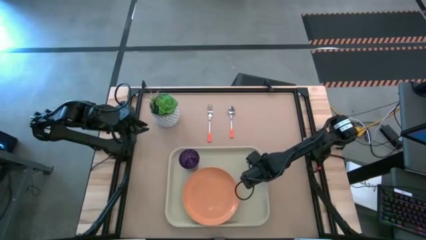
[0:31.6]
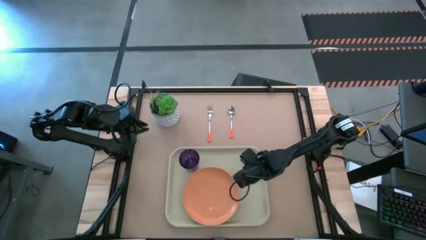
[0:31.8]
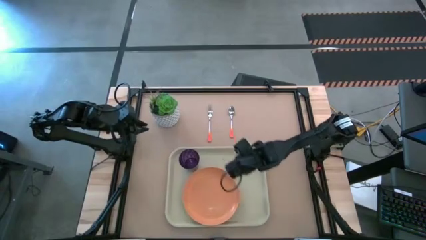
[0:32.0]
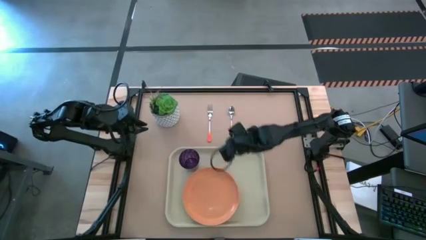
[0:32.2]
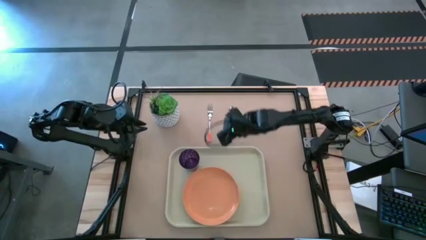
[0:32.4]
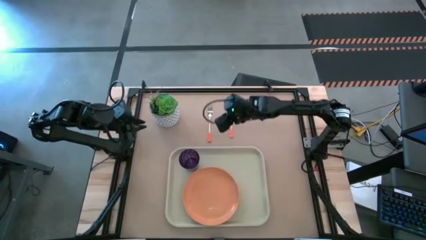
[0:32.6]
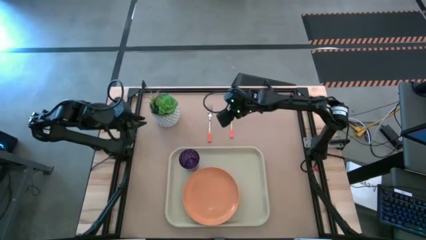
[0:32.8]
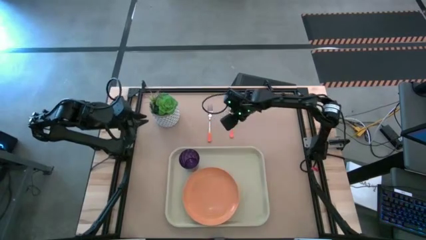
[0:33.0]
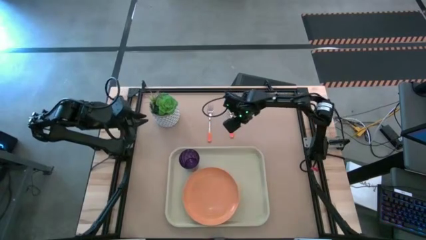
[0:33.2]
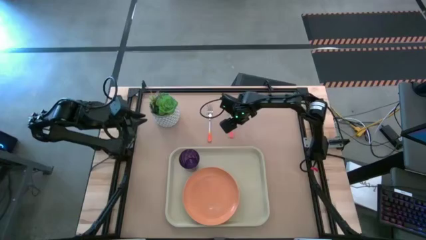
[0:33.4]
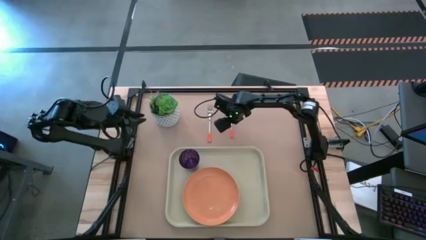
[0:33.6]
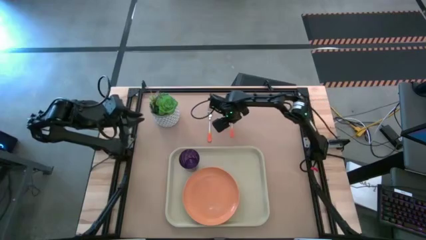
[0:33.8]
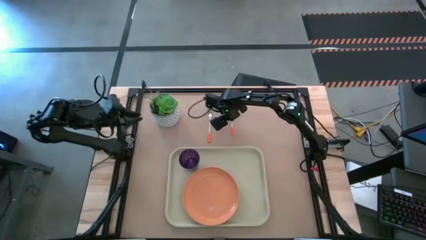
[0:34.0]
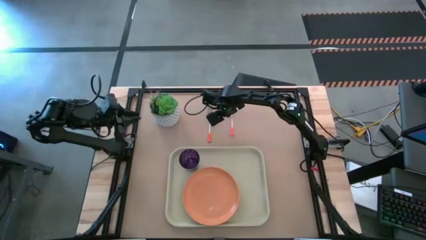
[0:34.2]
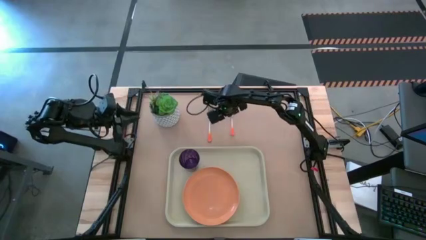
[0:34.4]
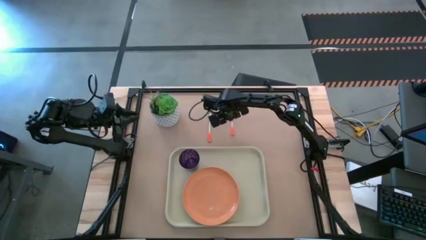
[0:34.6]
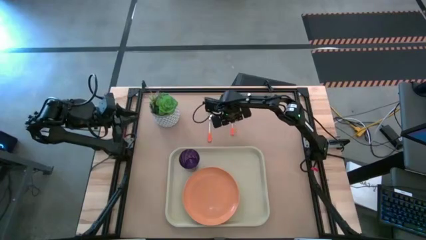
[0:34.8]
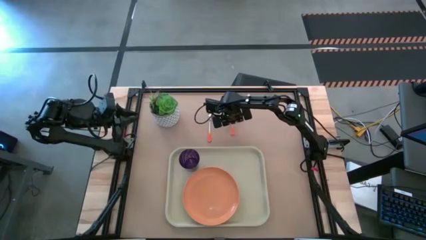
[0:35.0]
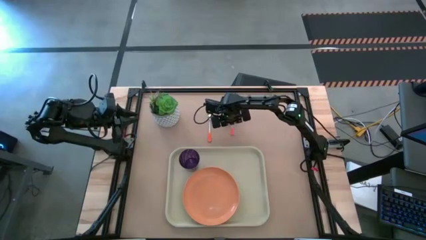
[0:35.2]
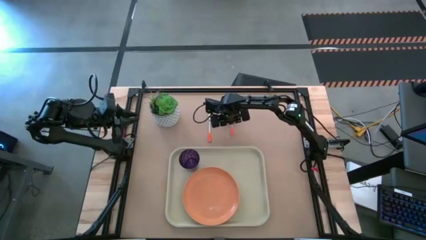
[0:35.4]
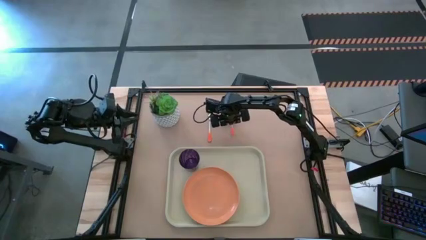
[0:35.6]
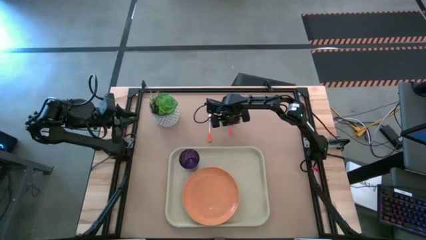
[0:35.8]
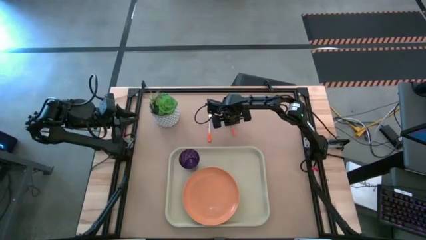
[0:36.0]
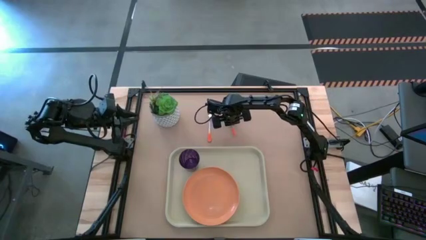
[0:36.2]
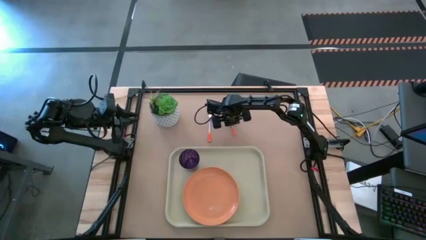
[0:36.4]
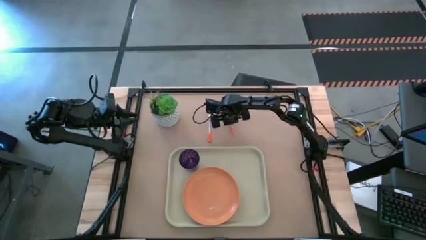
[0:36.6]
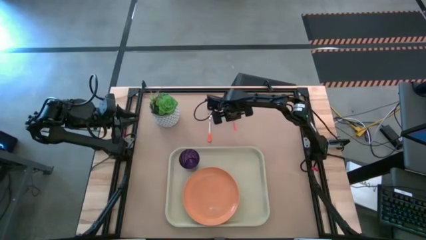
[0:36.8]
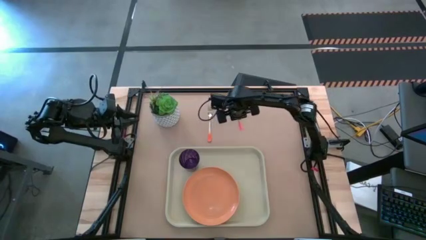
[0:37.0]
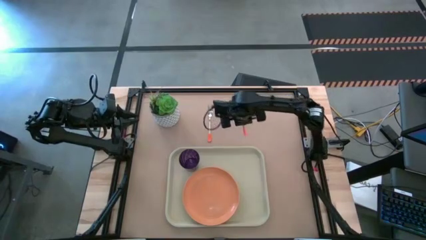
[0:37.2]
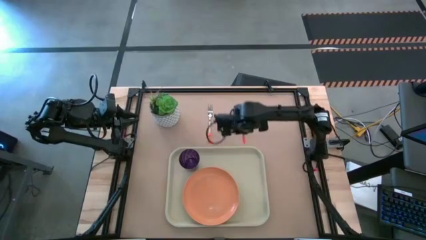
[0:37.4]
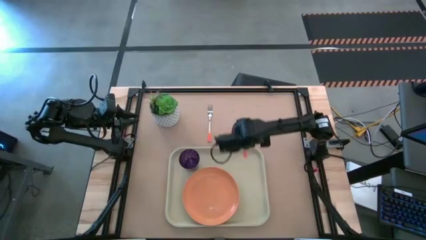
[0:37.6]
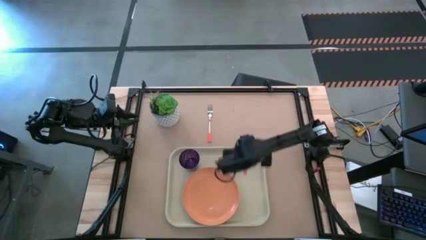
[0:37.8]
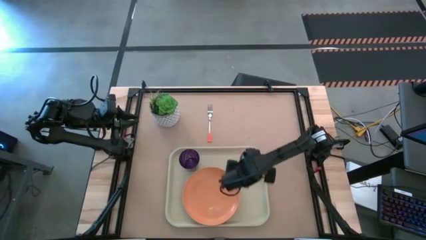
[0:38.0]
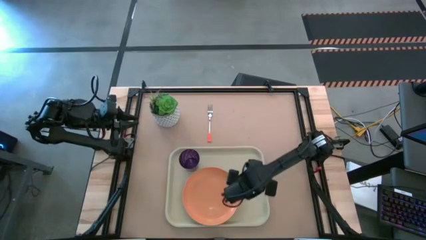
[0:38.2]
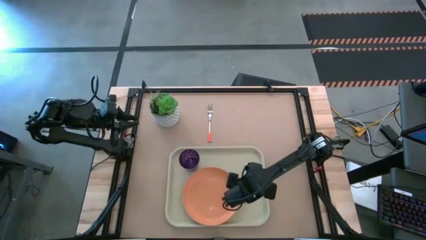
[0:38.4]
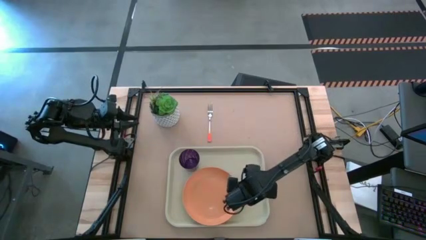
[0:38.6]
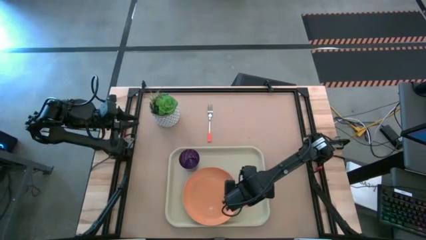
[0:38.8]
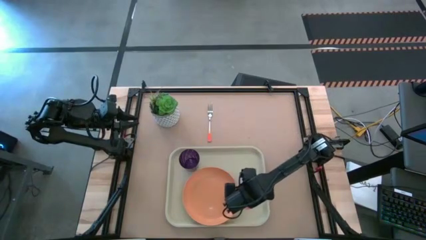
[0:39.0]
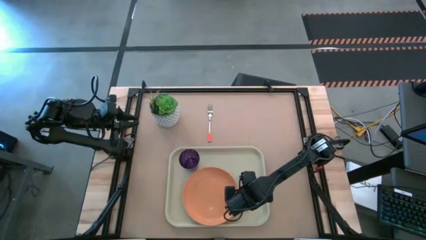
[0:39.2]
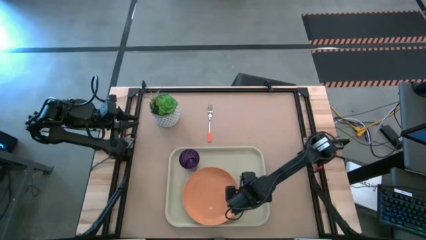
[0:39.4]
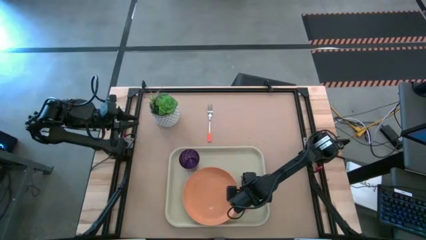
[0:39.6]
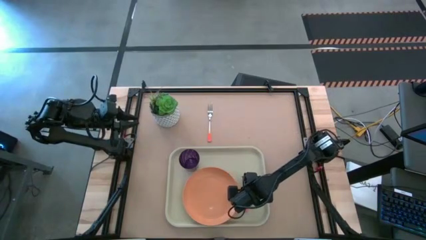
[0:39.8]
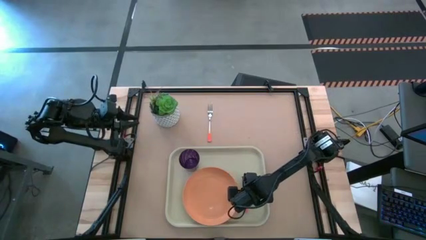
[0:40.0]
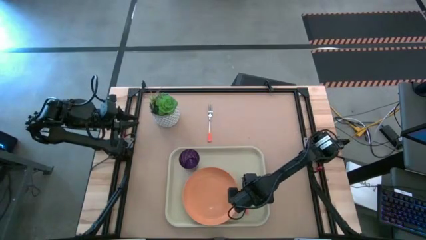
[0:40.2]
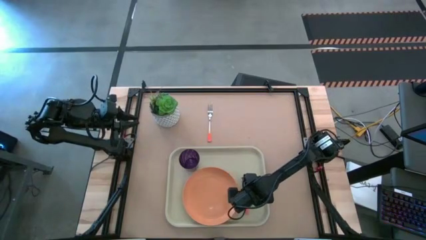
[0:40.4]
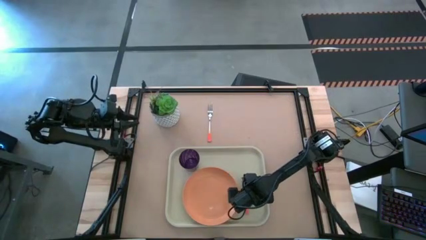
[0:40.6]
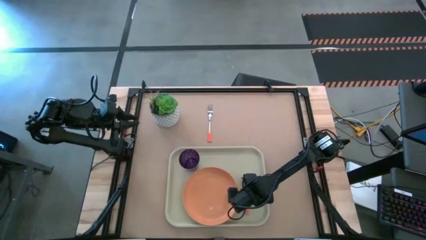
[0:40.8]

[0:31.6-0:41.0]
Task: Pick and place plate/cup/fork/spoon on tray
Put the orange spoon on the gray serving tray

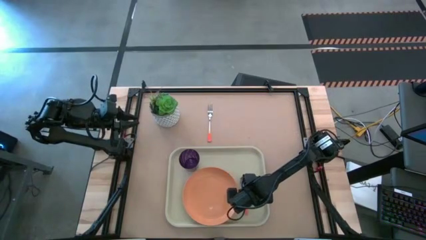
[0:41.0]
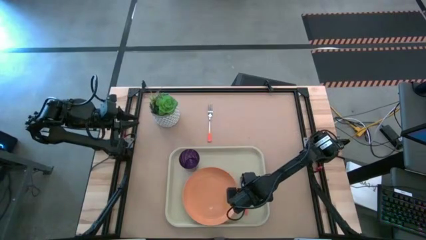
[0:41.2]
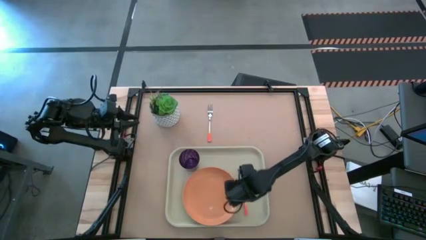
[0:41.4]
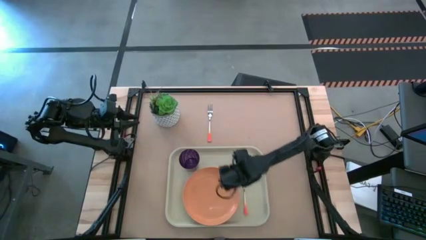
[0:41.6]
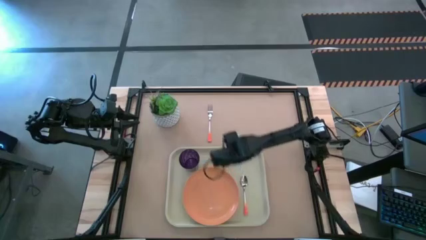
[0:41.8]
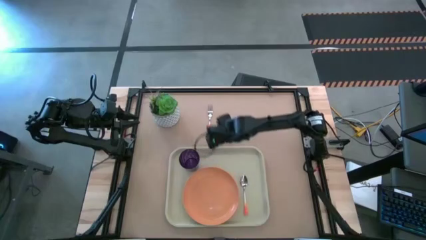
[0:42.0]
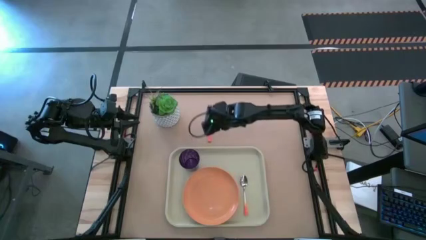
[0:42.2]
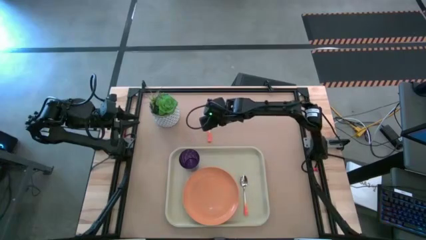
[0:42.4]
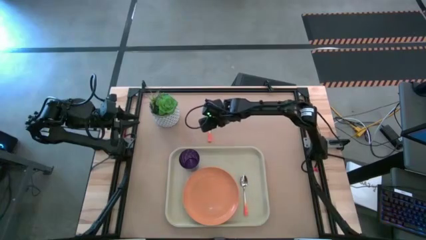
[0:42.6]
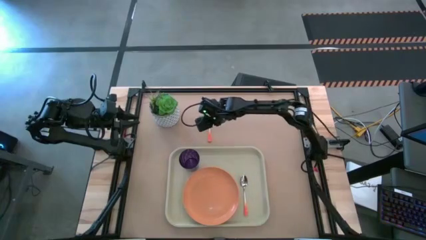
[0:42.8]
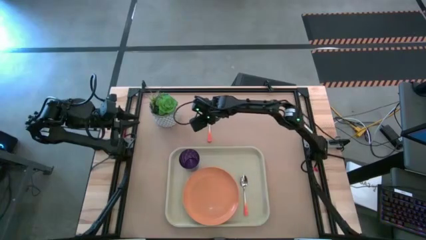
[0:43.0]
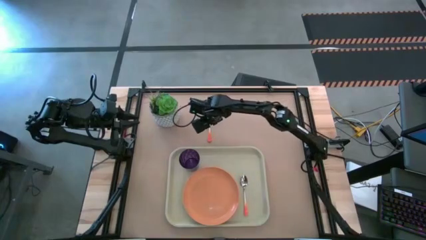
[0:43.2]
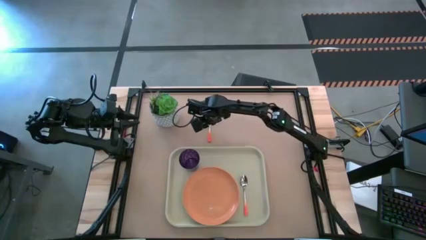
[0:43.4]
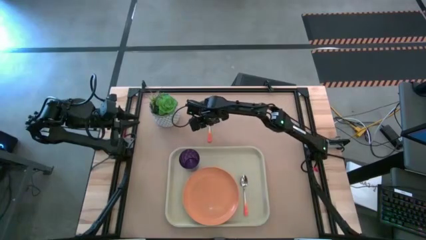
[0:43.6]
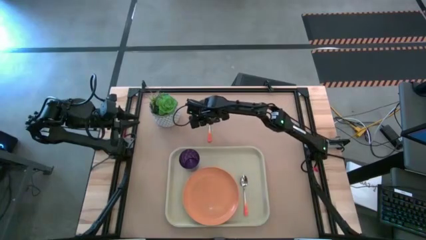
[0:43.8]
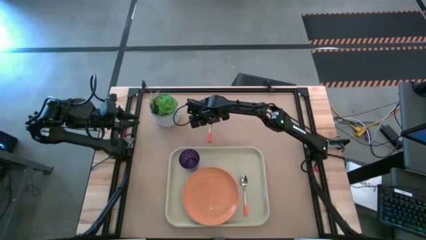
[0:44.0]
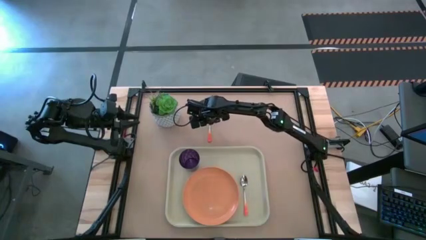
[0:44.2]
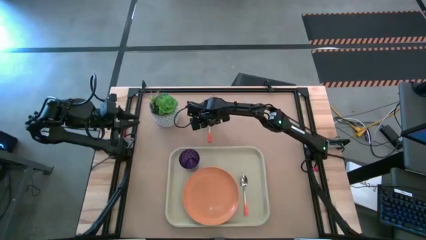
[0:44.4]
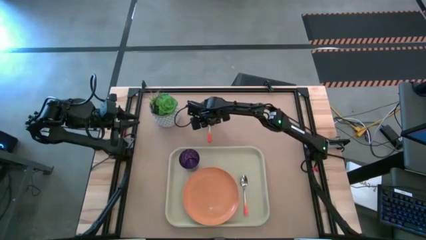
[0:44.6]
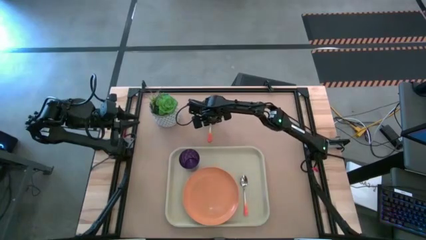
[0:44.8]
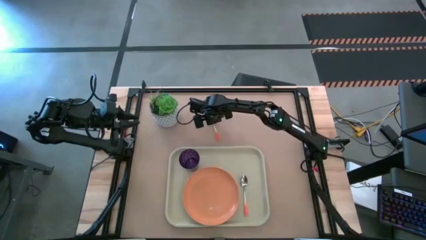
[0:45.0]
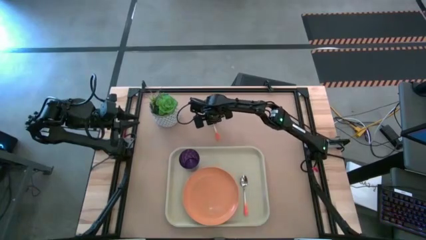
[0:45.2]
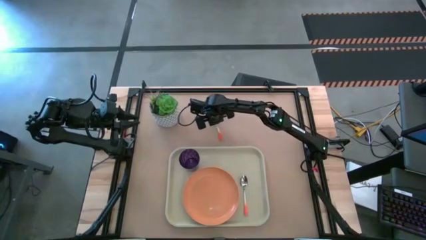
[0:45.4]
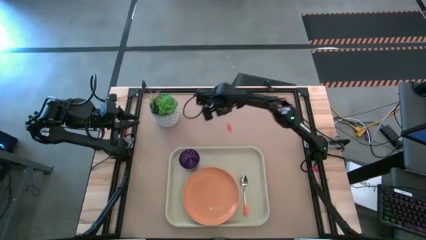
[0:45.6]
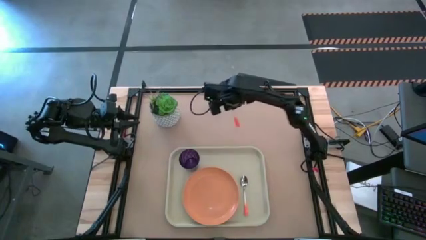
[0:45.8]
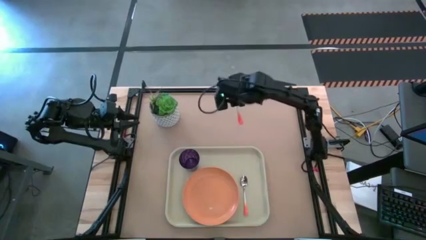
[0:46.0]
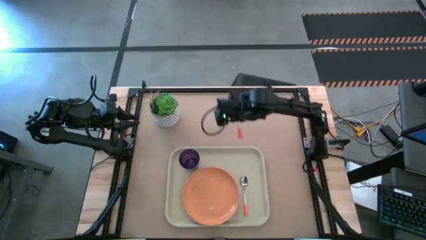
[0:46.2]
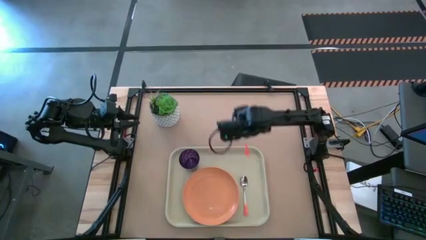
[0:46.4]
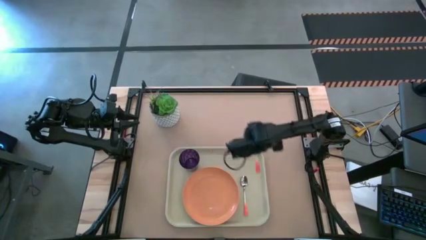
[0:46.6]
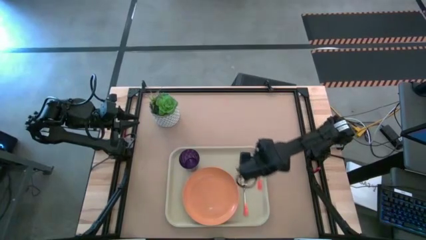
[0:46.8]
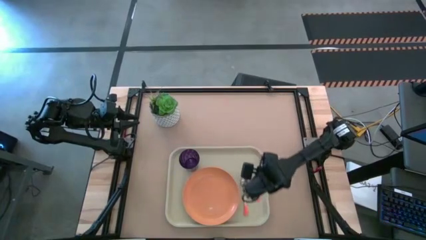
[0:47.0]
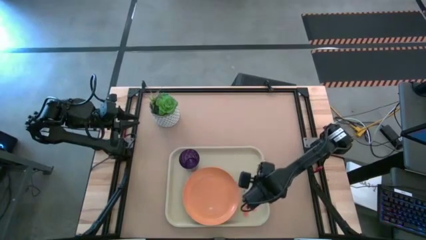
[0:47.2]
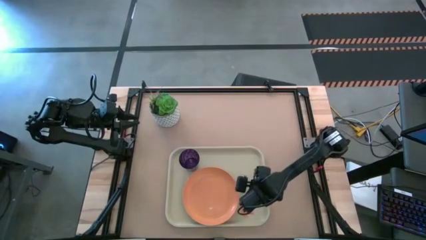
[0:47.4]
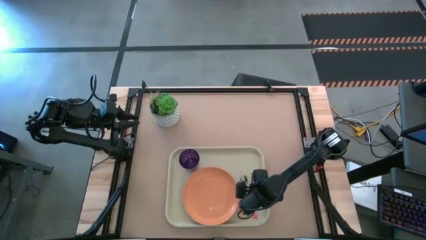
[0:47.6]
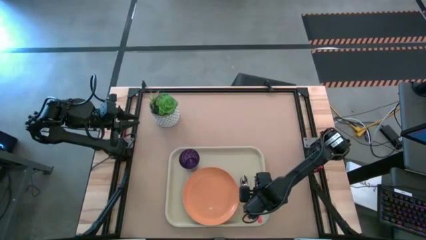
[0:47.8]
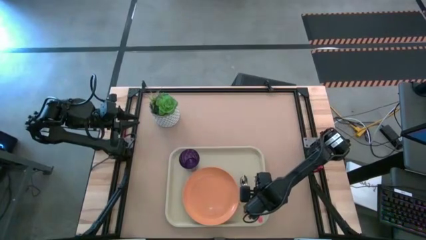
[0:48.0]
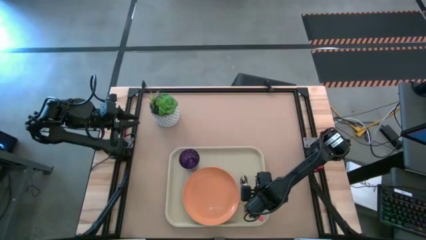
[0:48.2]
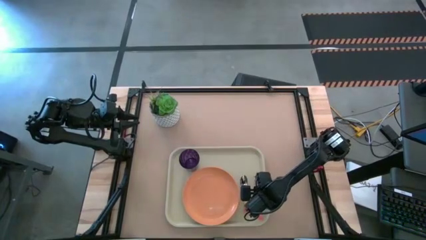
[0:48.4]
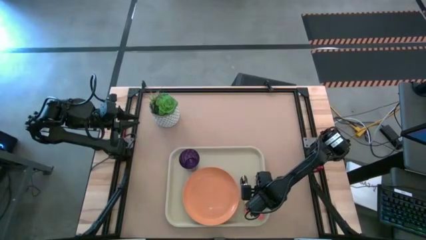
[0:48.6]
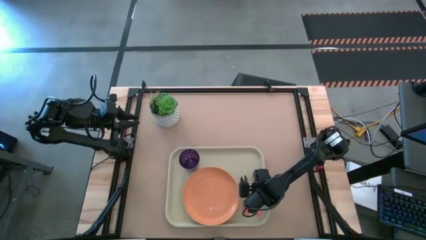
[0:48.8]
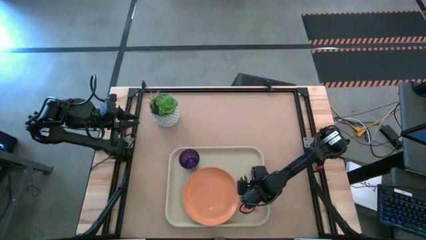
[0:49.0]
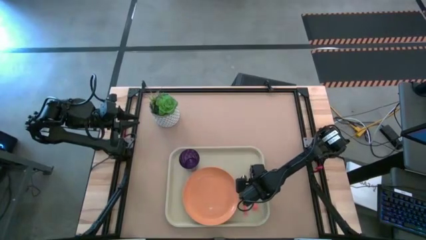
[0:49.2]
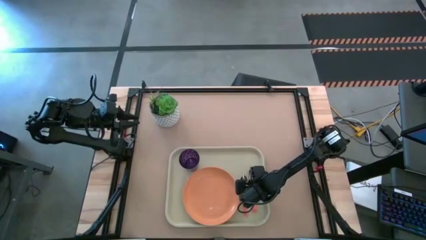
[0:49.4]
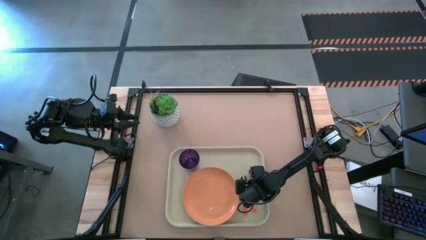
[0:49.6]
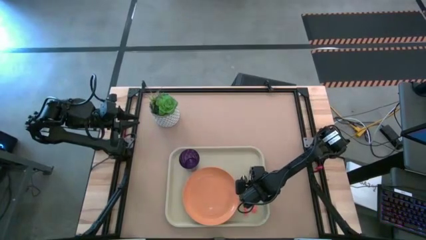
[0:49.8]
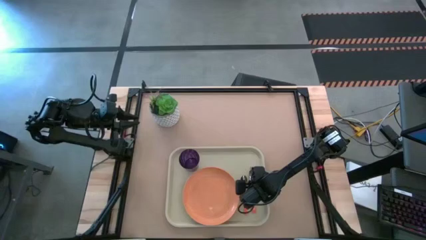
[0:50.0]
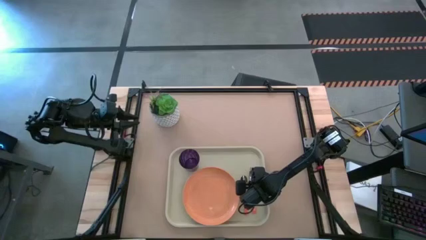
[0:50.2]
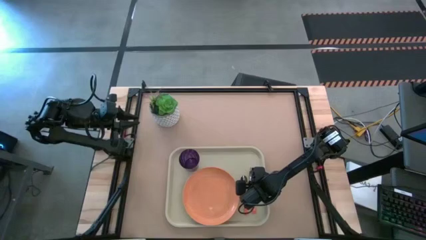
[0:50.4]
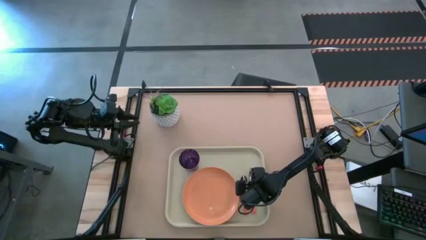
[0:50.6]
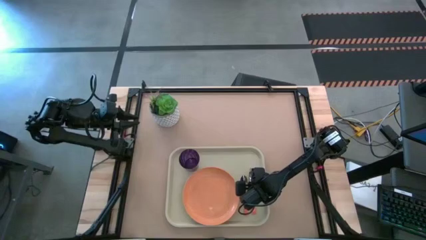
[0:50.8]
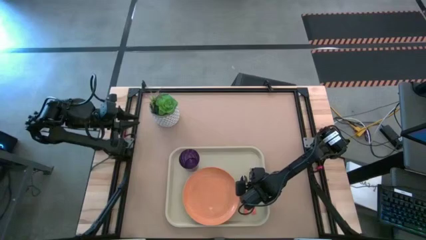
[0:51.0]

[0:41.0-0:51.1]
Put the orange fork on the gray serving tray
